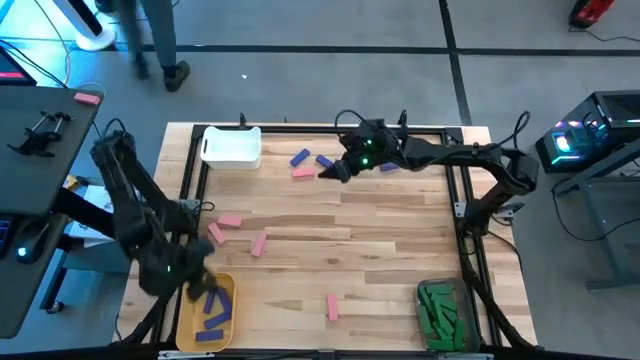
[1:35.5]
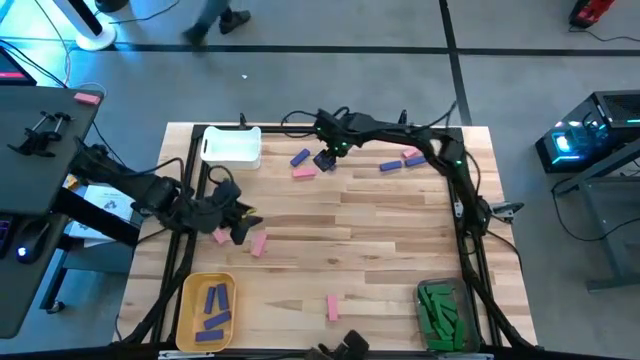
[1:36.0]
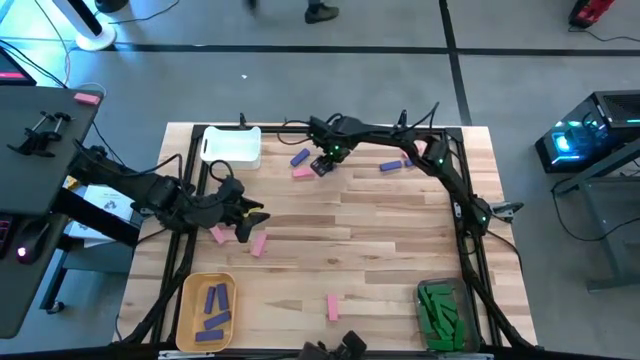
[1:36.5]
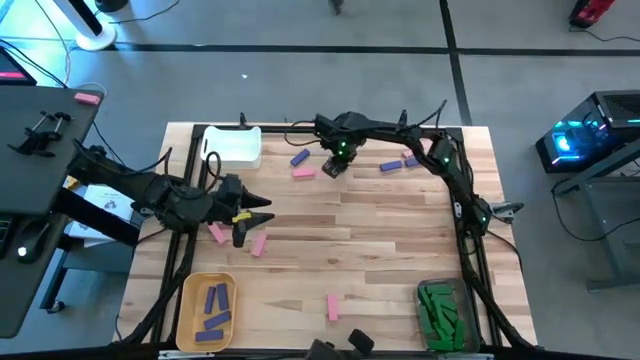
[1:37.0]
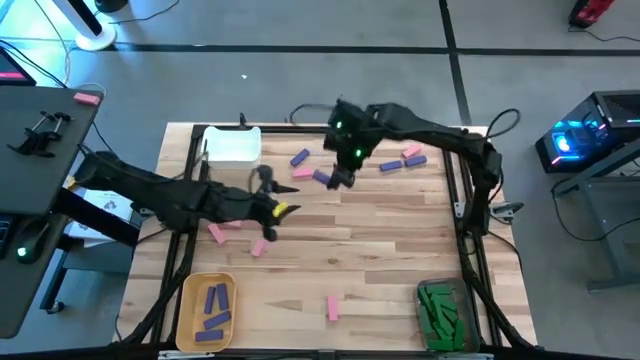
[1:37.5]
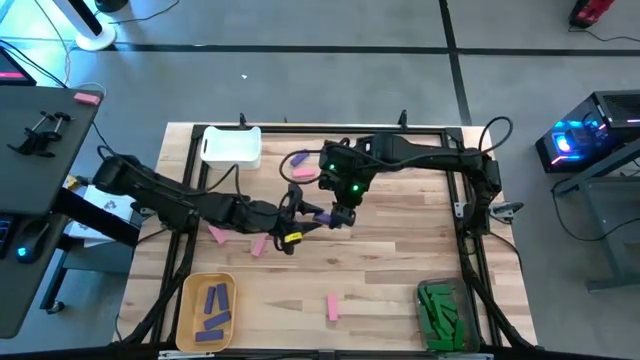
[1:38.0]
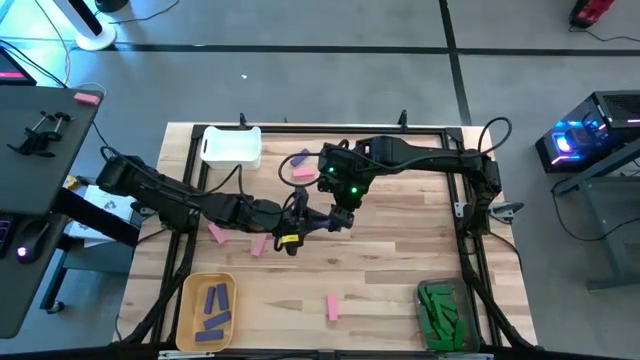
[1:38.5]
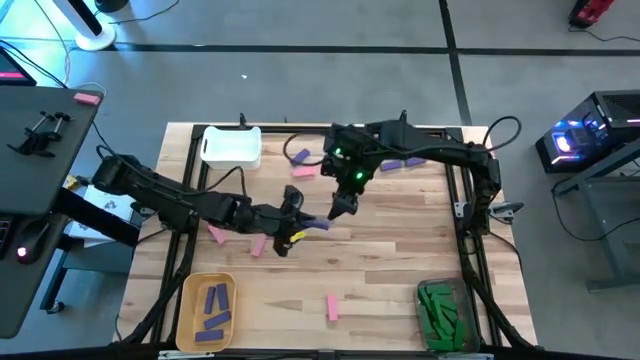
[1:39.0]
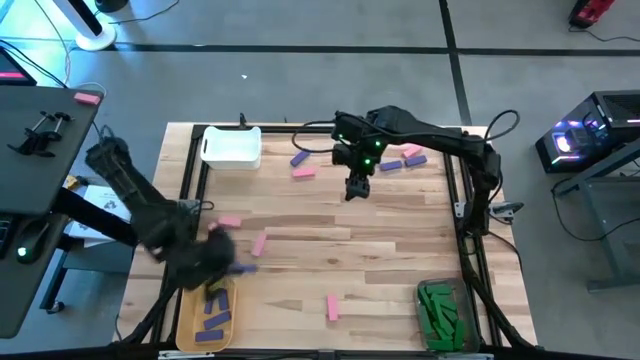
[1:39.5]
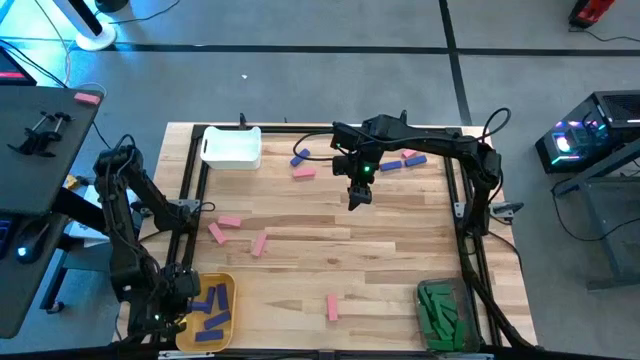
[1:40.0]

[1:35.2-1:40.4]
Task: Sort blocks
Put the blue wooden block into the yellow bin

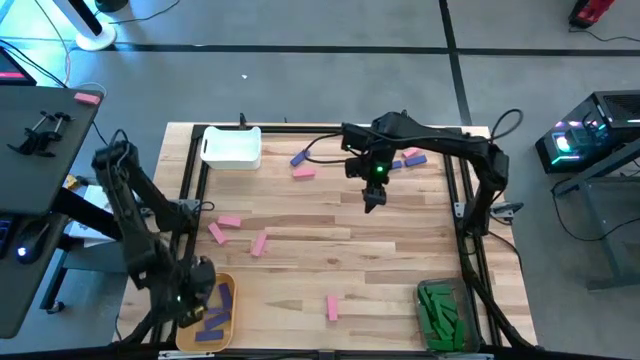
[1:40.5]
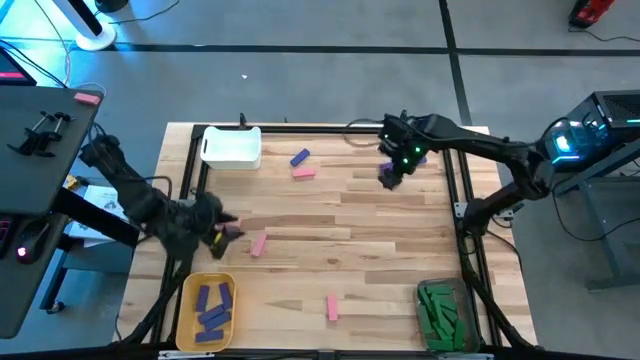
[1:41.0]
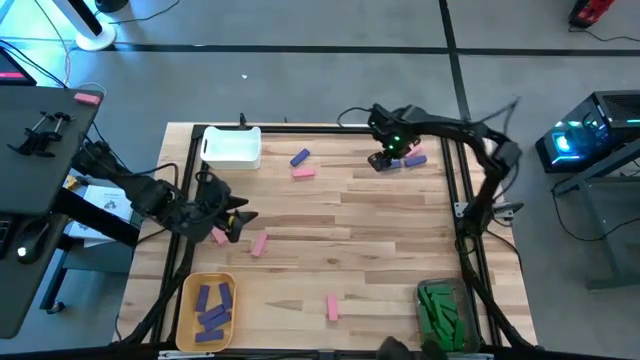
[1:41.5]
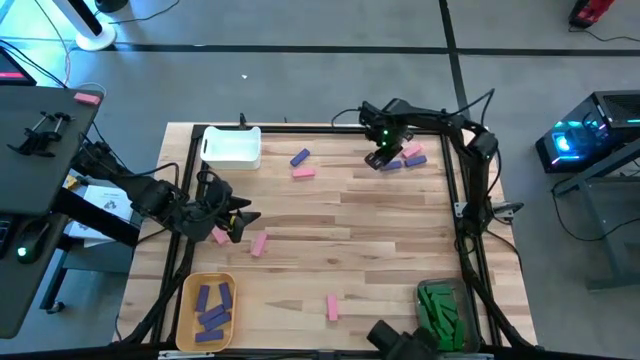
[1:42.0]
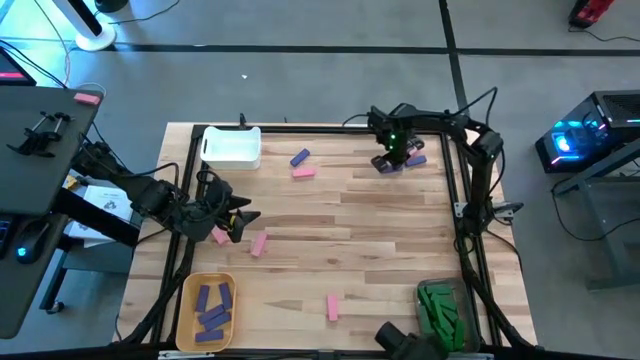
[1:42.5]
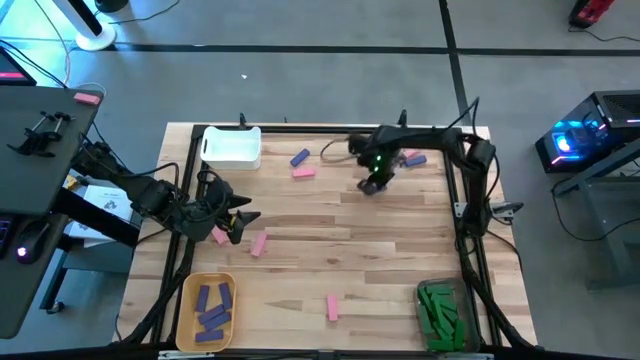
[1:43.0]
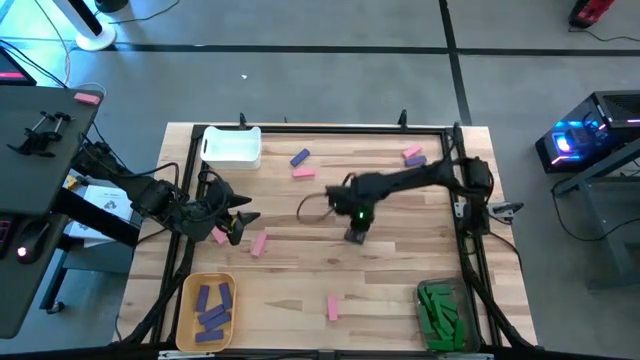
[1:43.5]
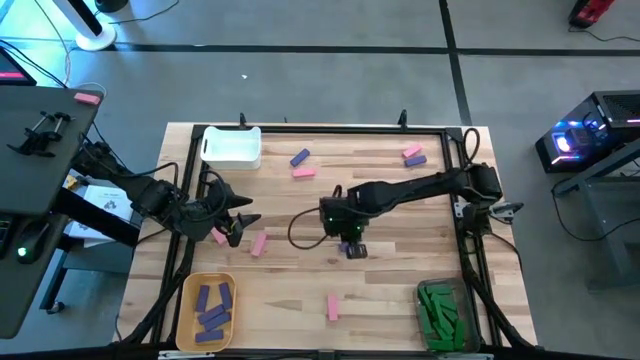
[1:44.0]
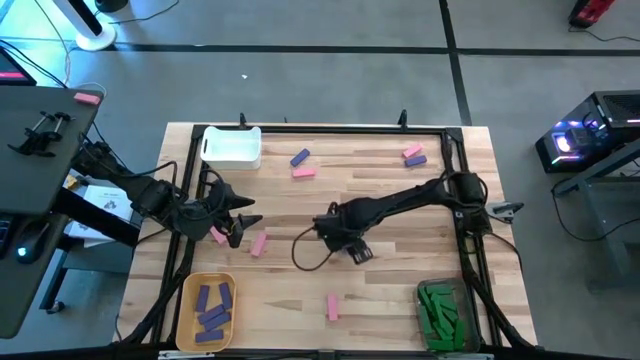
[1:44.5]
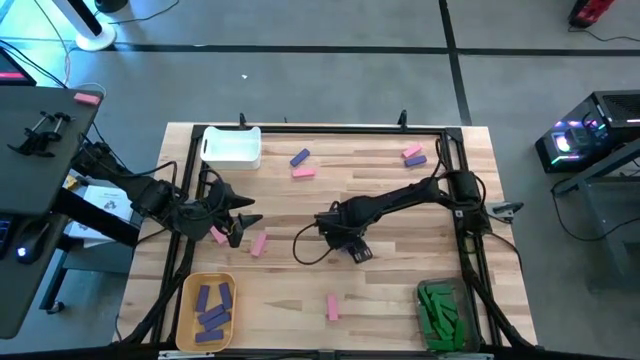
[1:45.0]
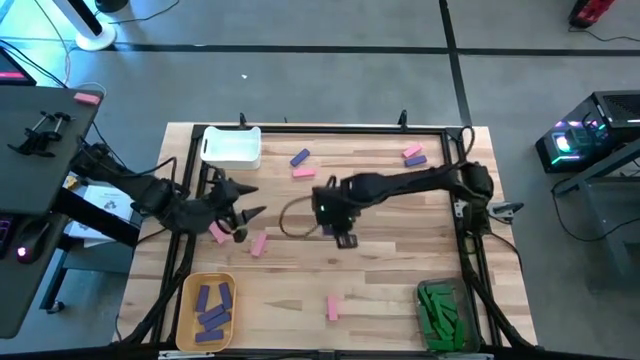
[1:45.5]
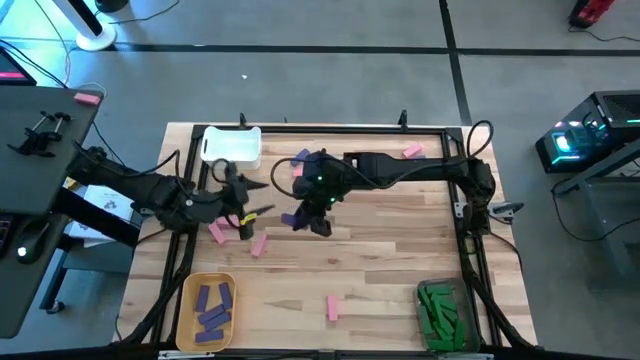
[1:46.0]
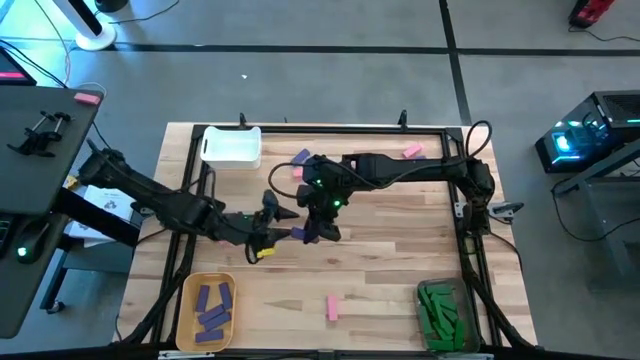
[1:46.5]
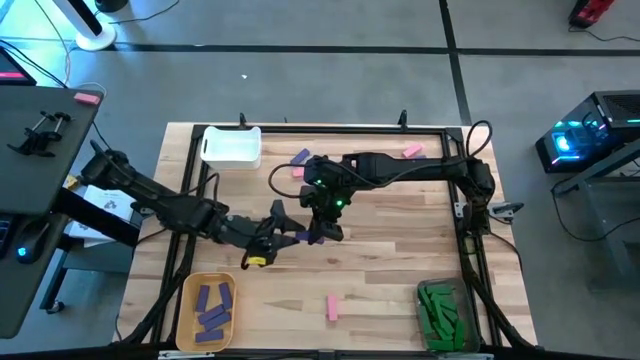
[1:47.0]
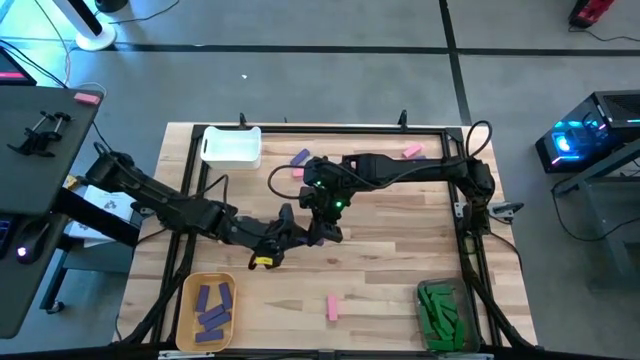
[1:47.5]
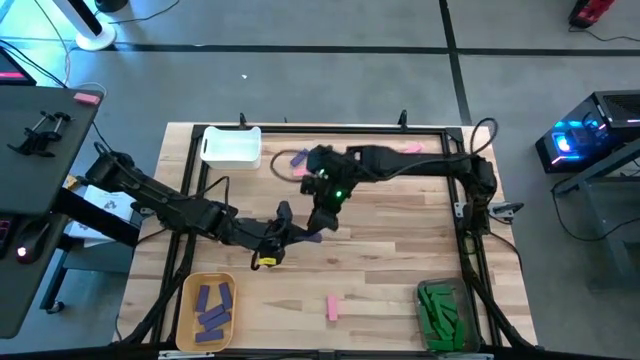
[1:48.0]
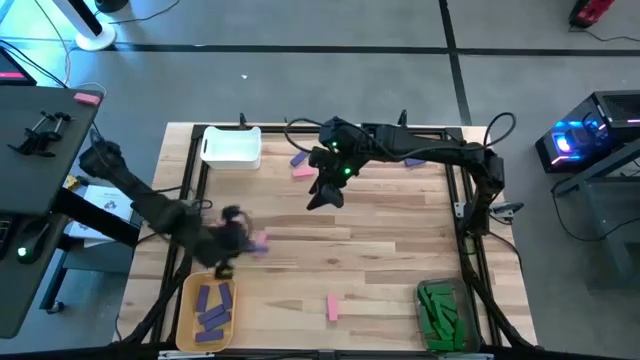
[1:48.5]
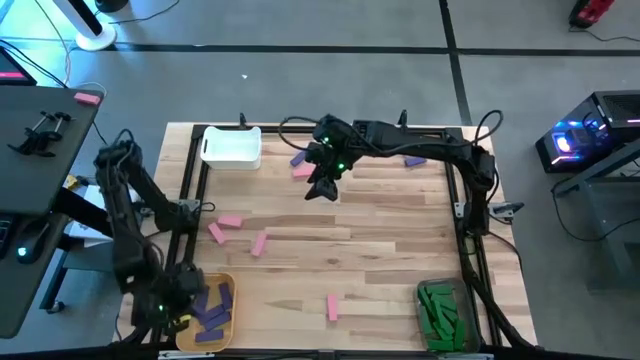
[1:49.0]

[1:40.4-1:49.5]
Put the blue wooden block into the yellow bin

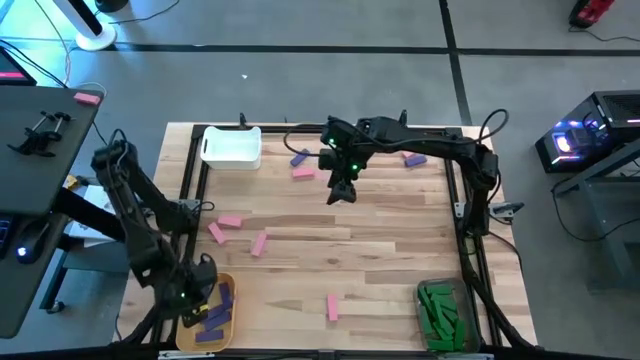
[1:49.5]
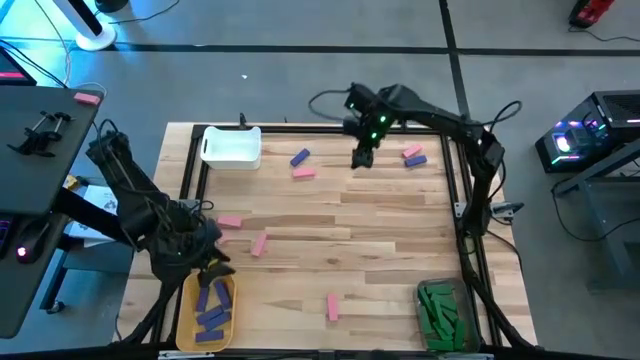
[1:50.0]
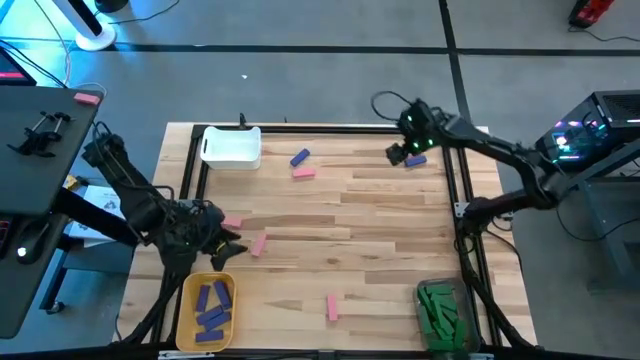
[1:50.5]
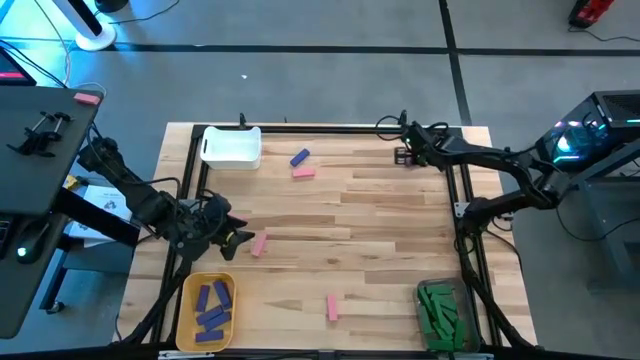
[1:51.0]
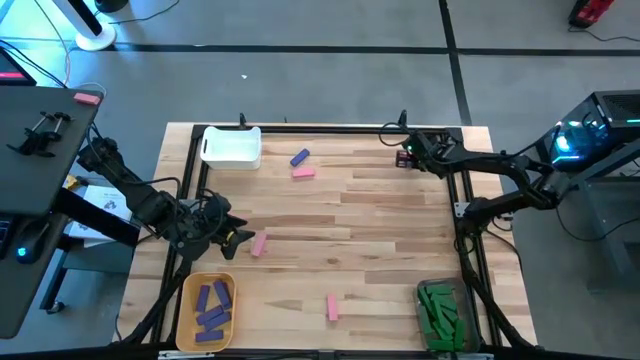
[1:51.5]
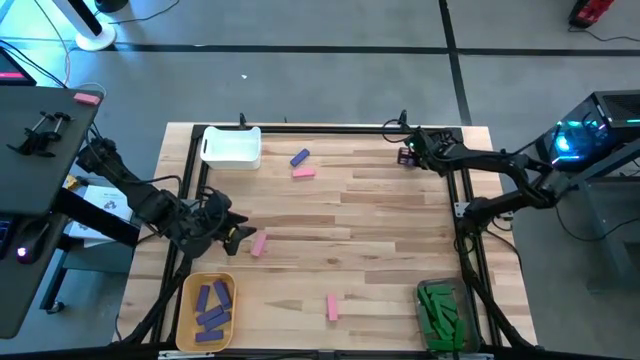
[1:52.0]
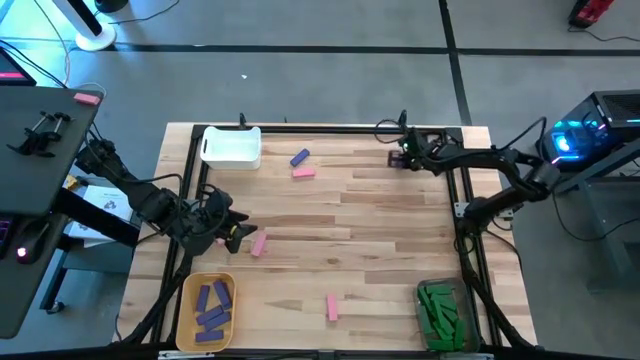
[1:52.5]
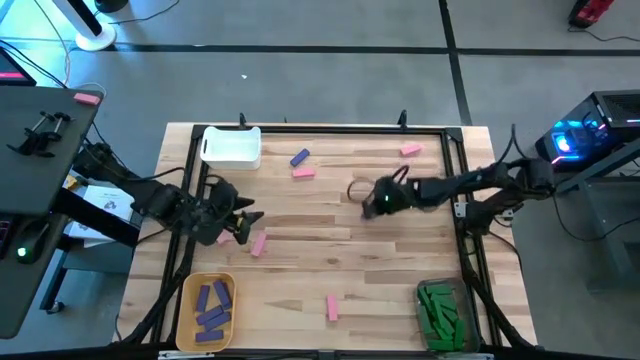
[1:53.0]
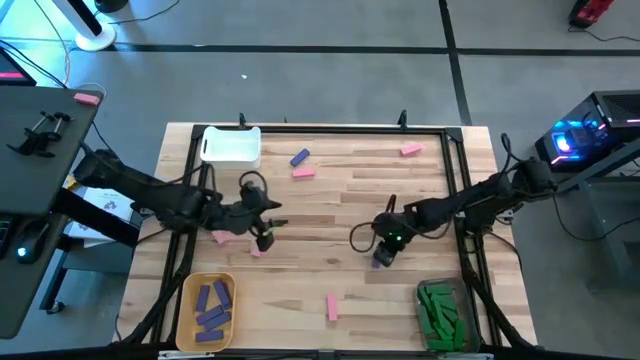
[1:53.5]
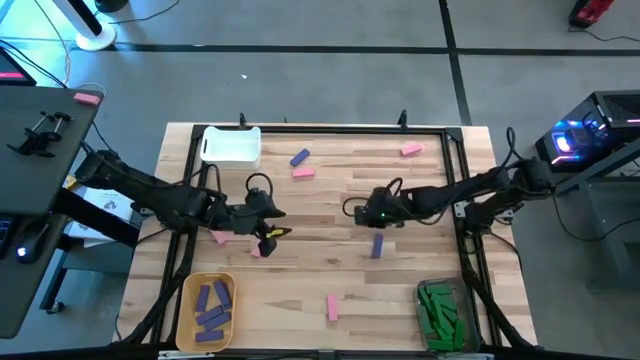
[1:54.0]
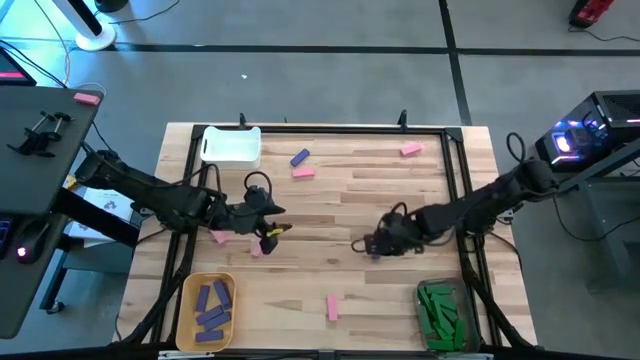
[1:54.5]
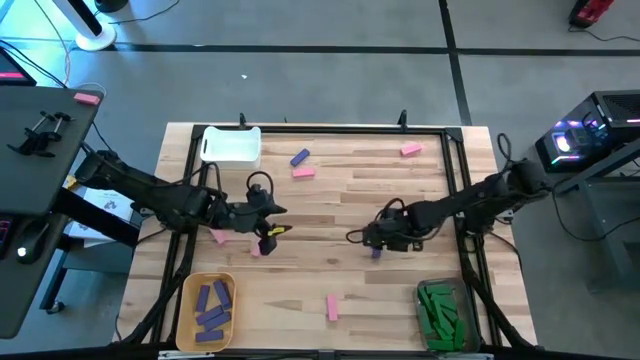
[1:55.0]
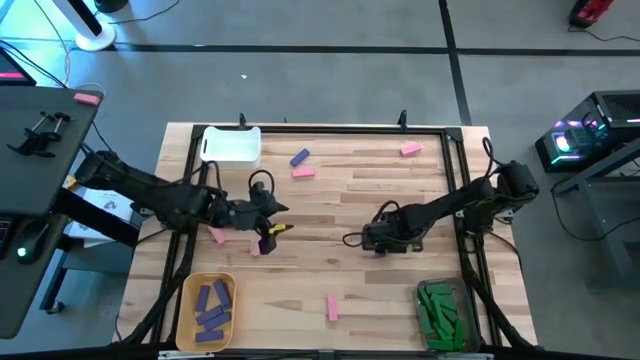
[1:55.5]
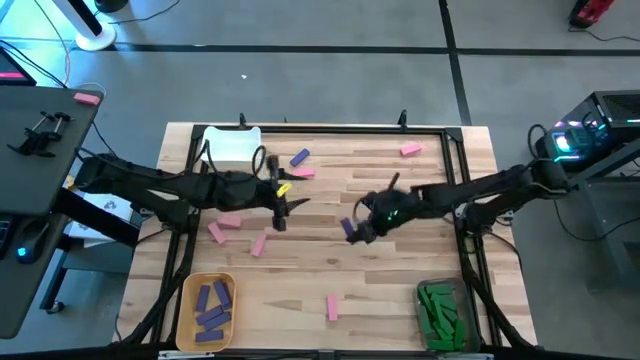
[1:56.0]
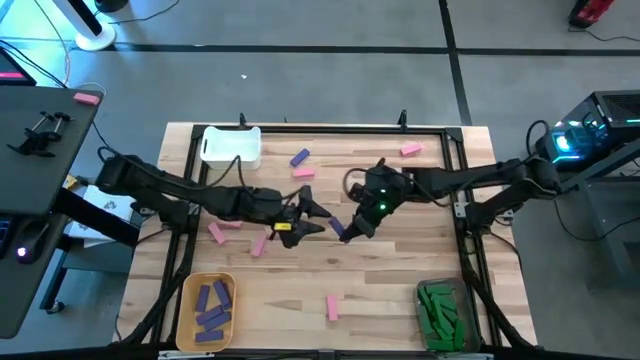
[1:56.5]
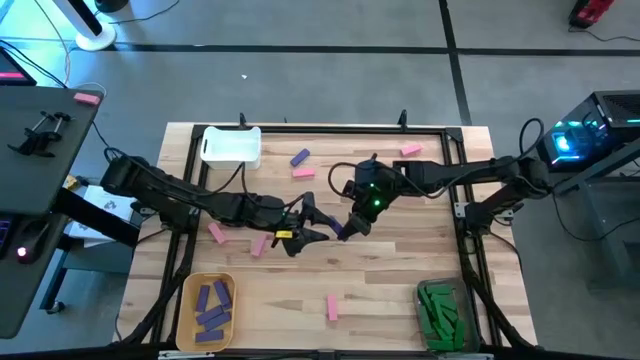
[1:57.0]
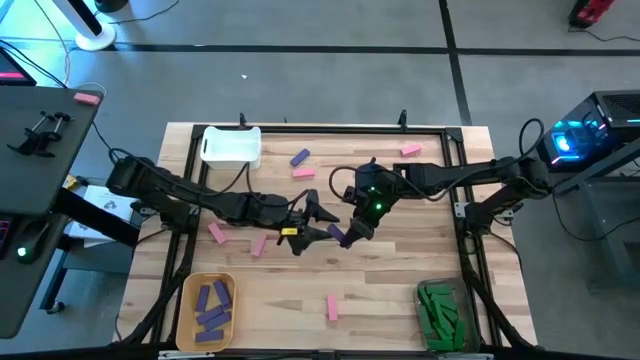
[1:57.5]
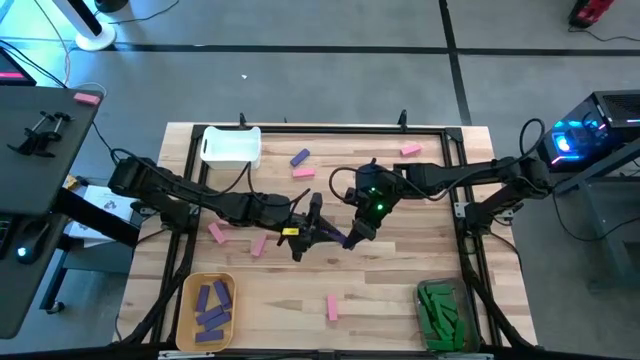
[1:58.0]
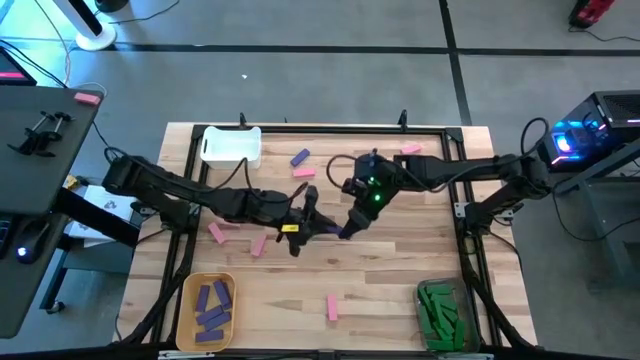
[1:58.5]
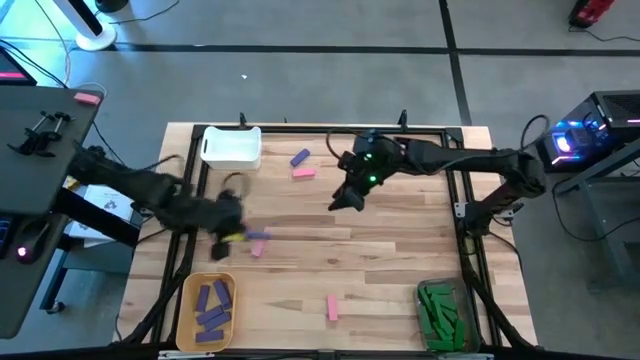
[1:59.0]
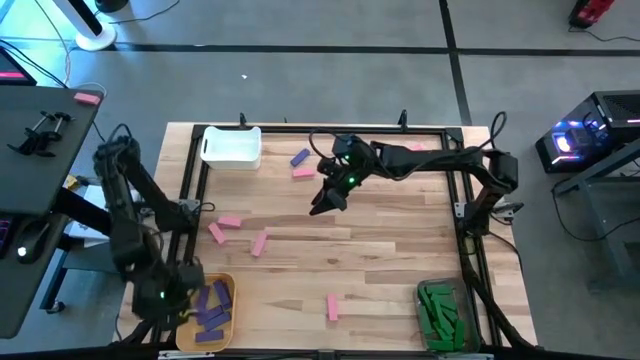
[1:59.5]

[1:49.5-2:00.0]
Put the blue wooden block into the yellow bin
